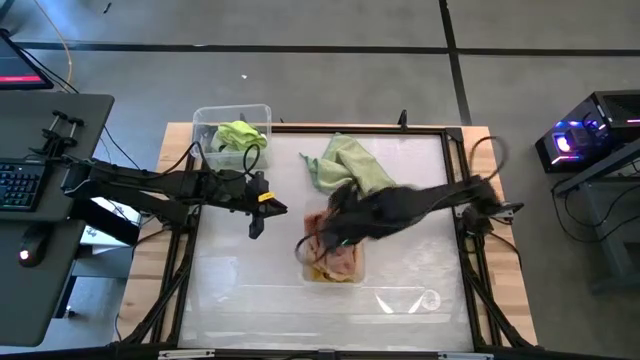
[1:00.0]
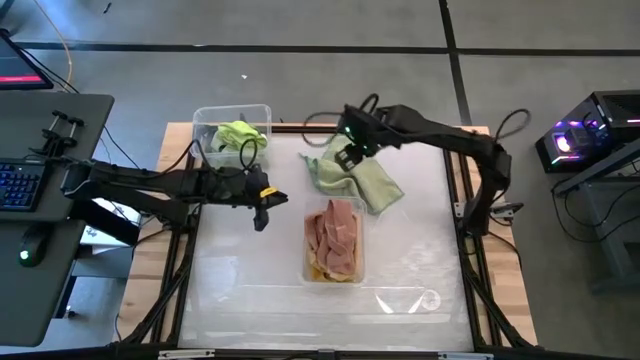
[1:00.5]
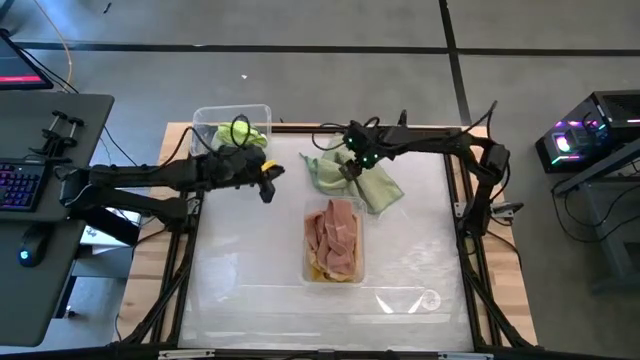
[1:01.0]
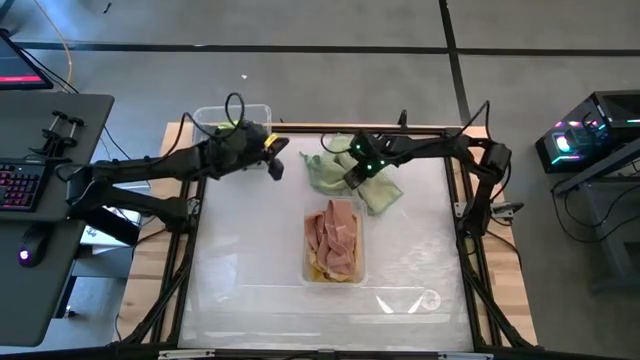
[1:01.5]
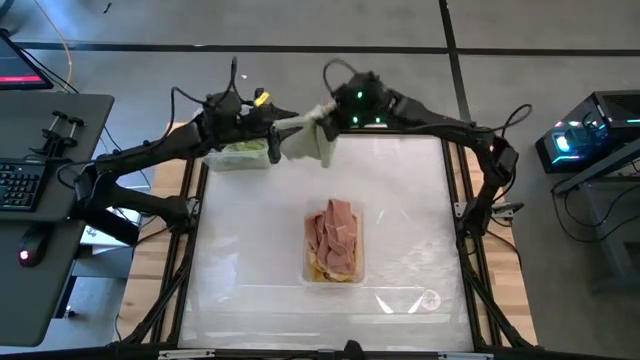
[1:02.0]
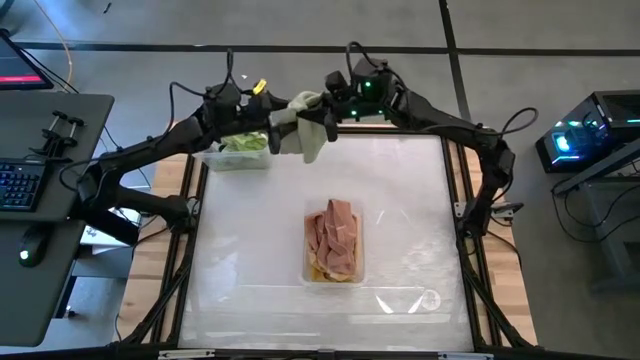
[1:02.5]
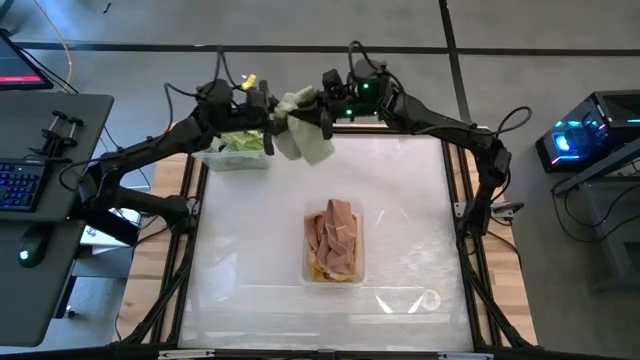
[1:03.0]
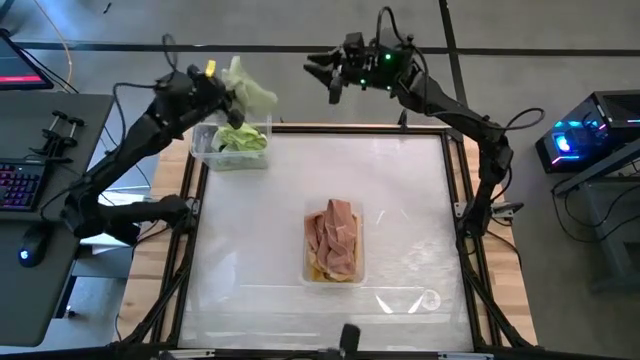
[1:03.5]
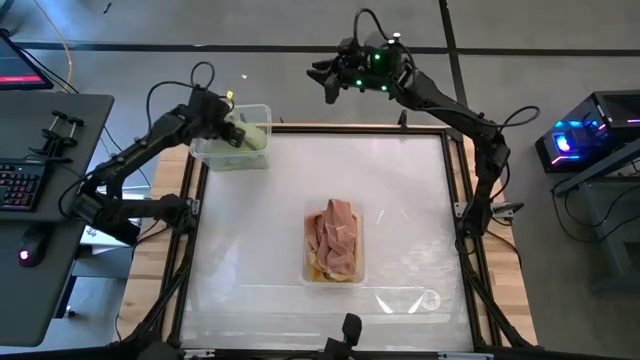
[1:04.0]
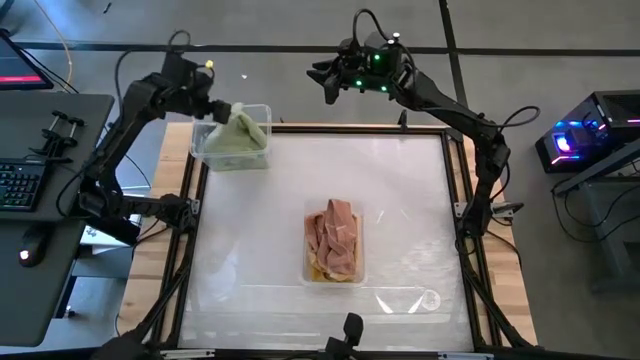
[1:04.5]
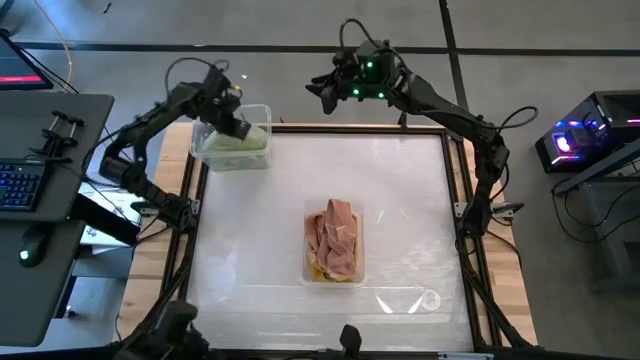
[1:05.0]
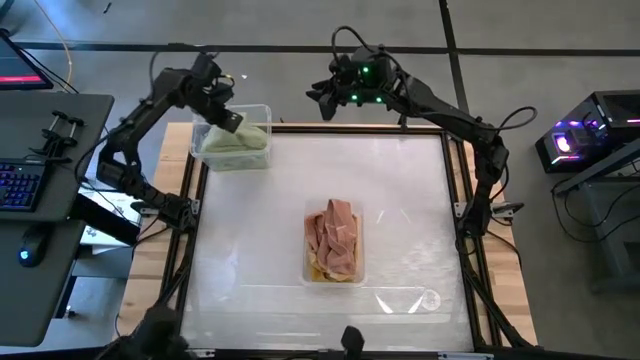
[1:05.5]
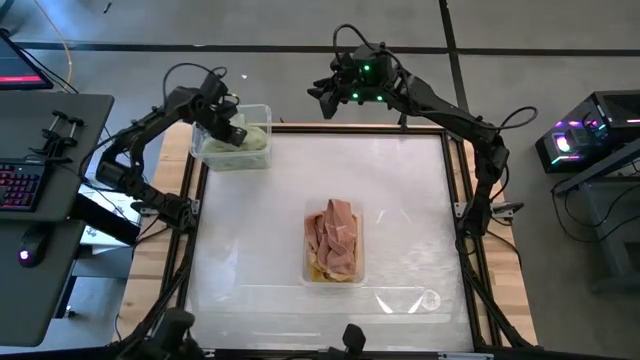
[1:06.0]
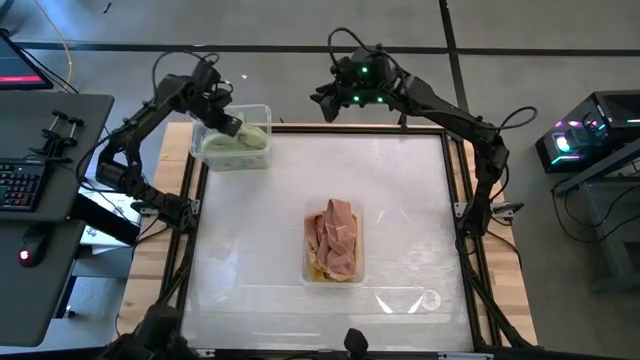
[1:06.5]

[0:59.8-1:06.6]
Task: Sort towels by color in basket
Put the dark green towel into the top transparent bin

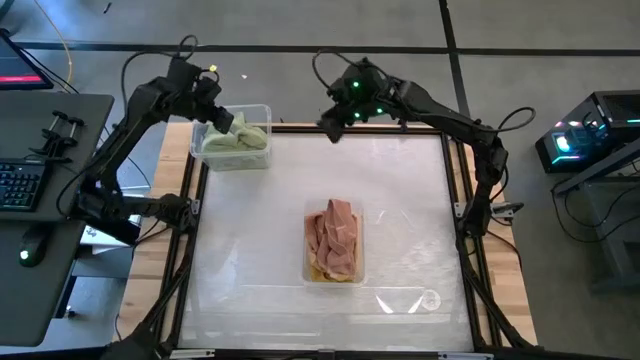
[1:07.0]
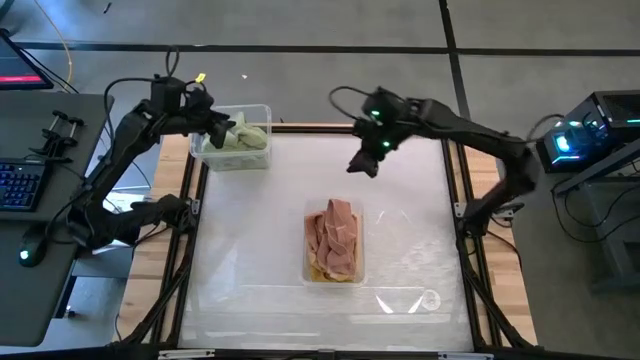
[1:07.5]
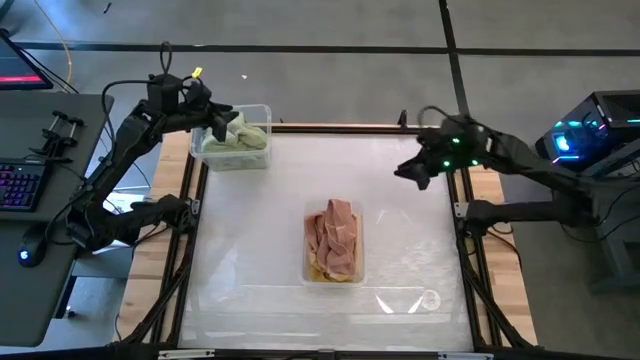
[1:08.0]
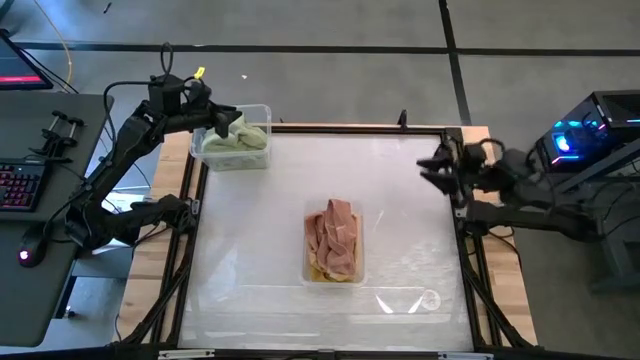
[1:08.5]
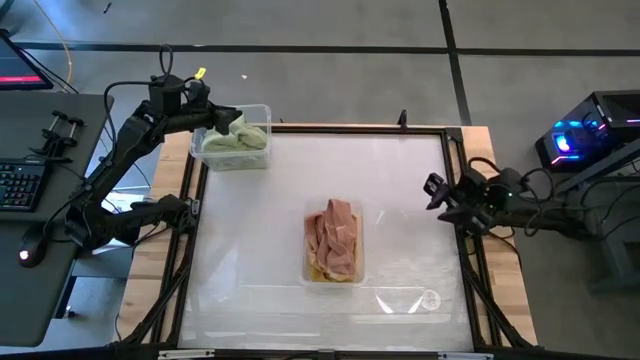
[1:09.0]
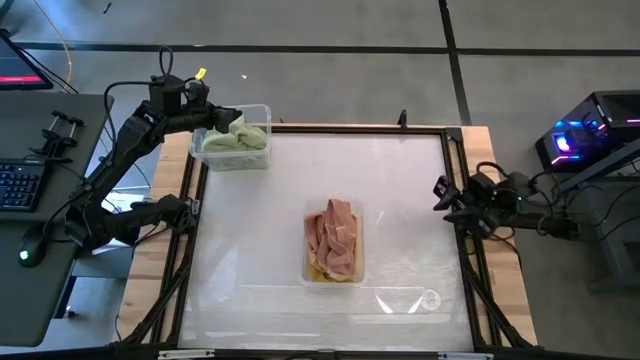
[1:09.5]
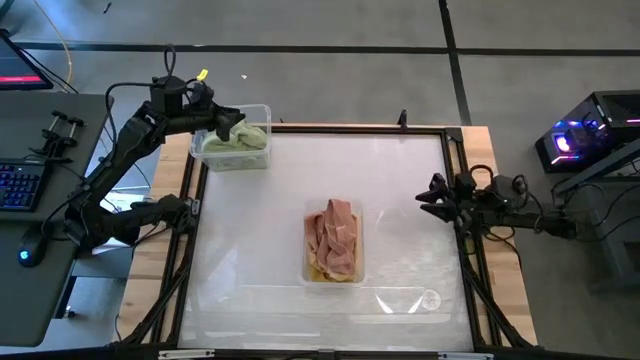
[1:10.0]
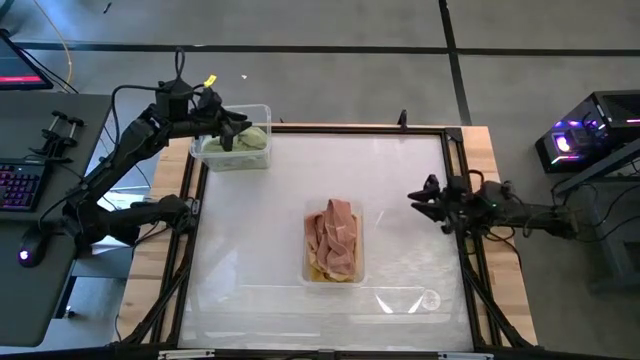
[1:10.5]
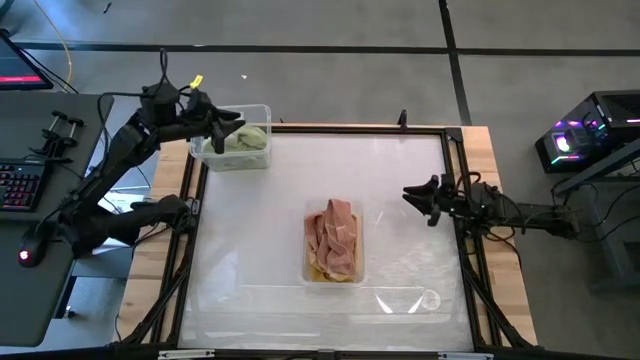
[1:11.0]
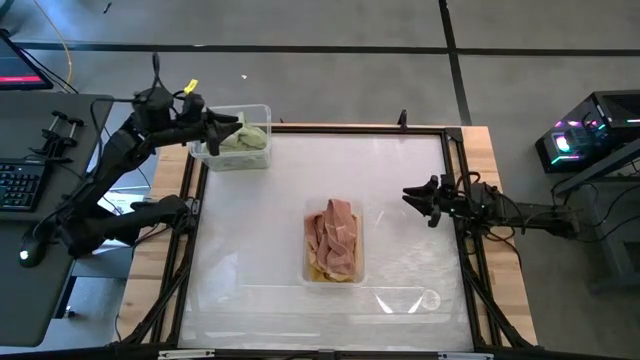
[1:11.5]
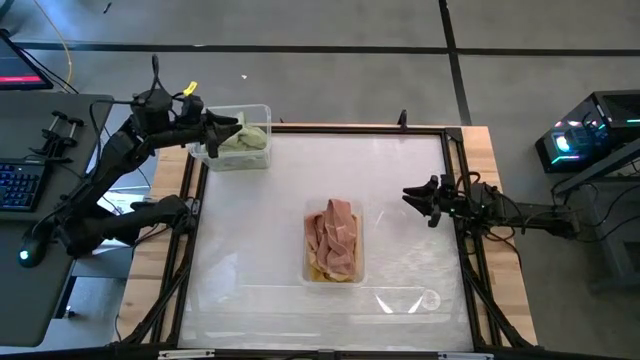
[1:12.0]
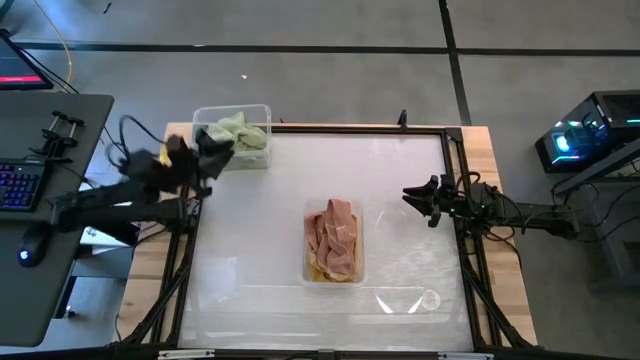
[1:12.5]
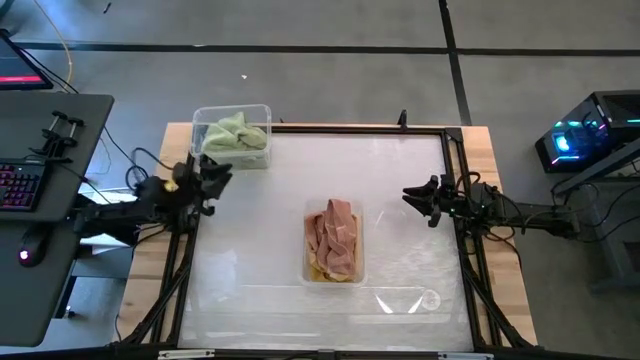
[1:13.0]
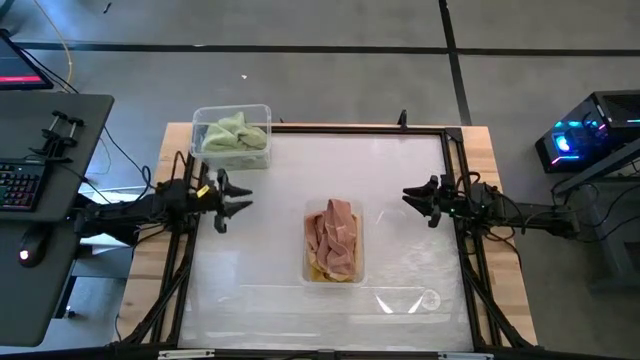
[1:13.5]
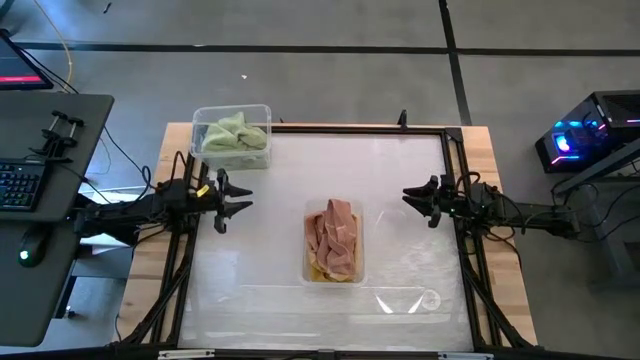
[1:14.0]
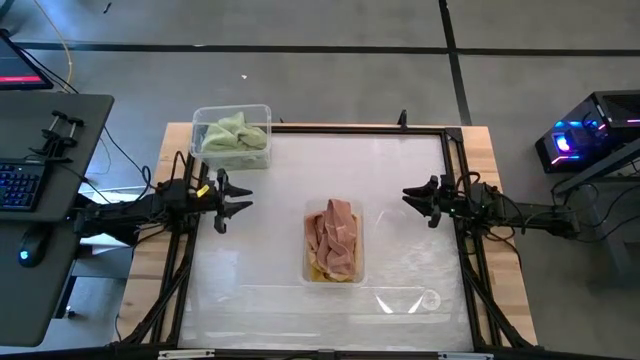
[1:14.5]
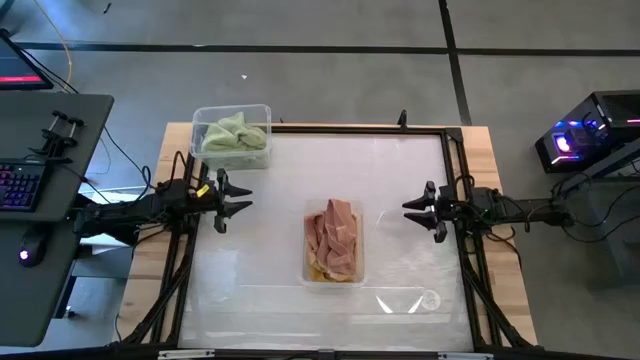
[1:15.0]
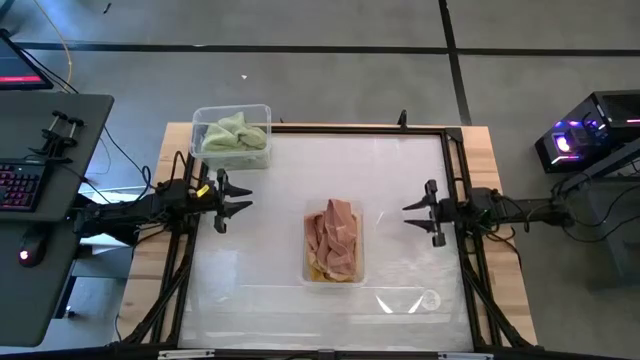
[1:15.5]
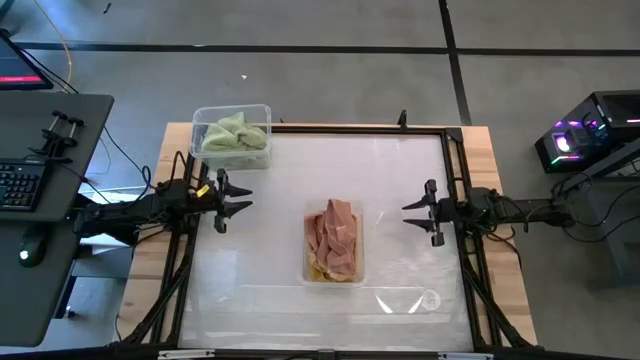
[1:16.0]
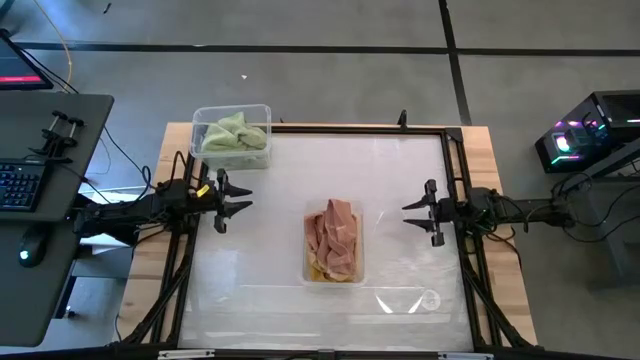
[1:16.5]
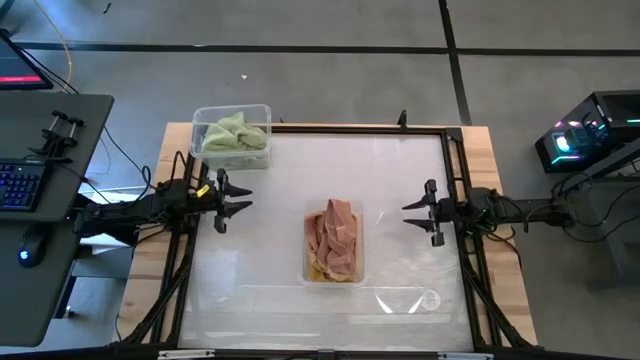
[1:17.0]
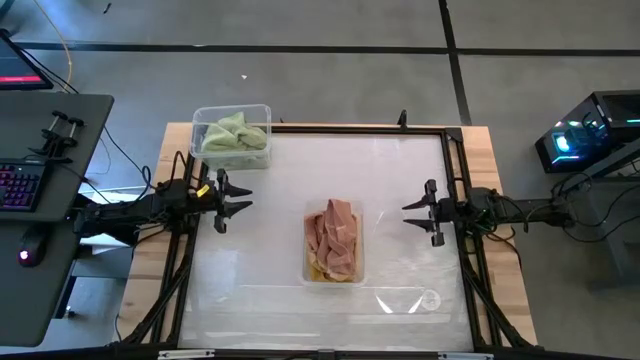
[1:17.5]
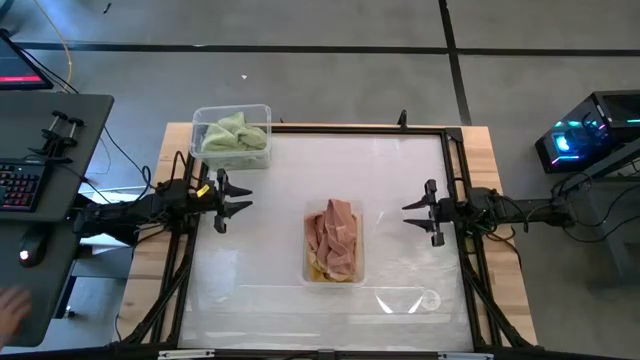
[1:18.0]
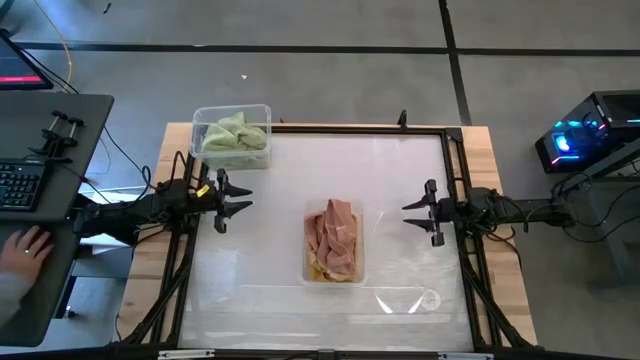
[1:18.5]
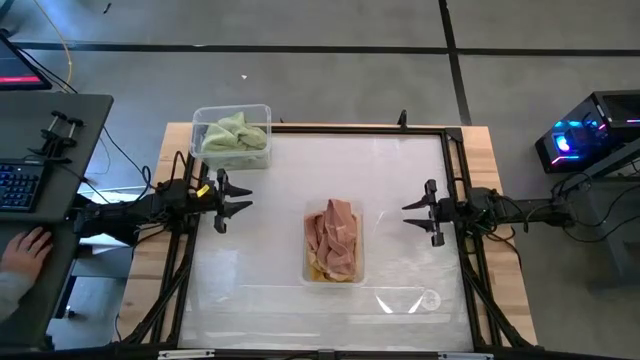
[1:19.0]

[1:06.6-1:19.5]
Return to Home Position

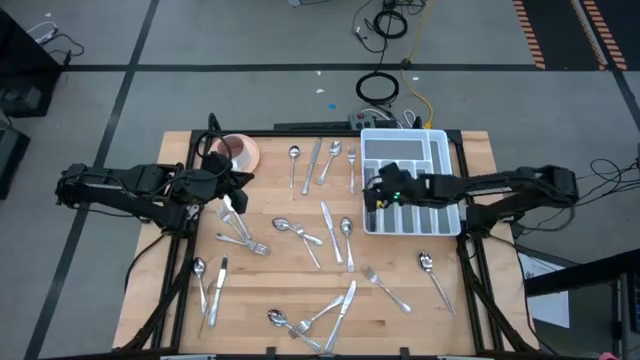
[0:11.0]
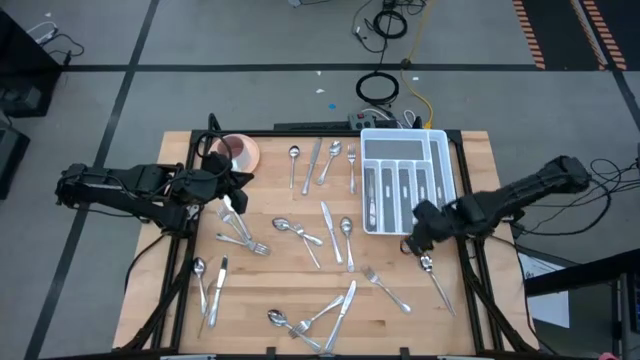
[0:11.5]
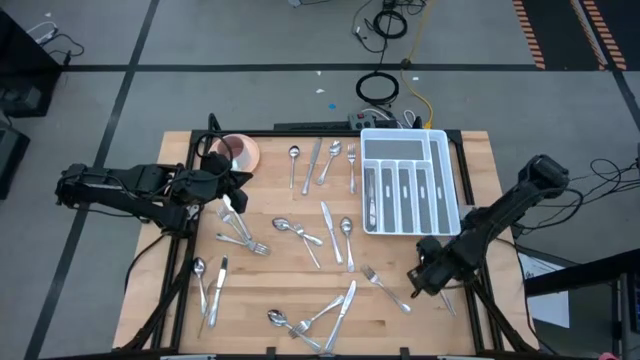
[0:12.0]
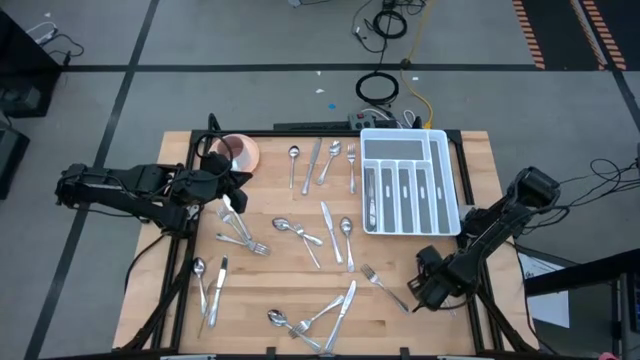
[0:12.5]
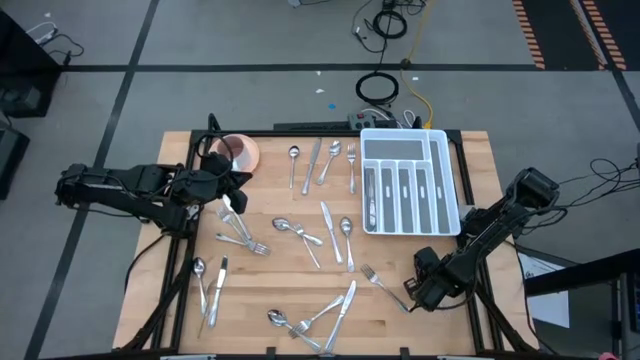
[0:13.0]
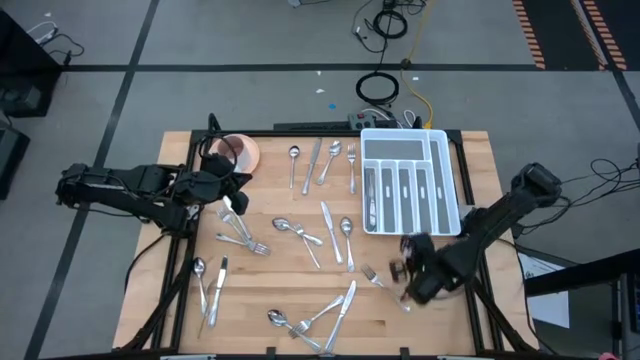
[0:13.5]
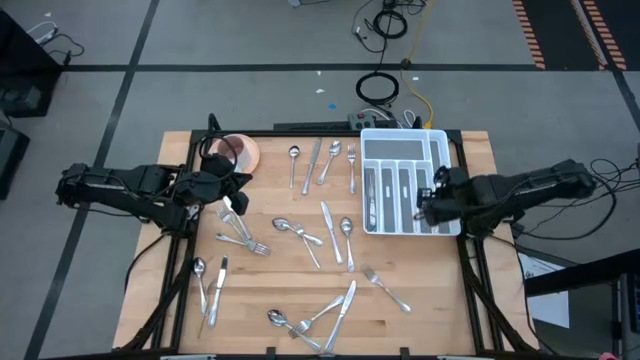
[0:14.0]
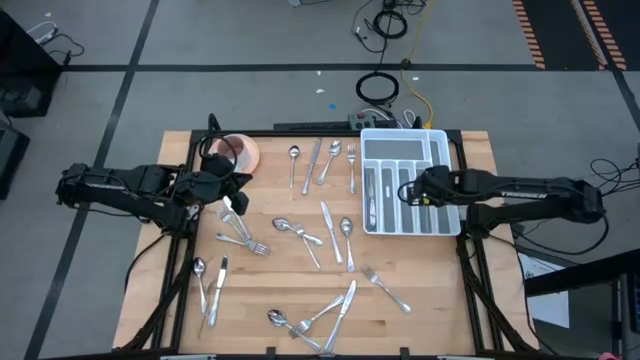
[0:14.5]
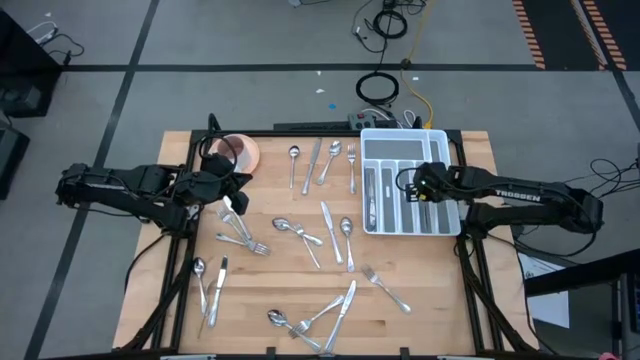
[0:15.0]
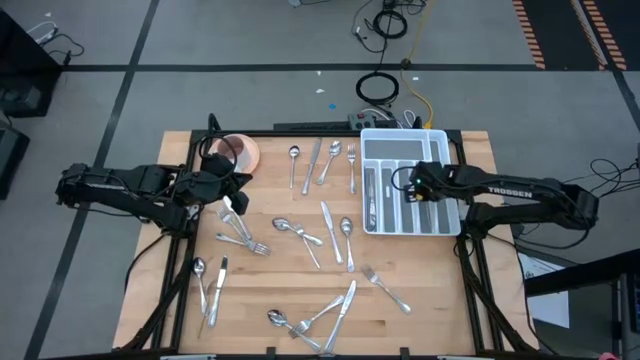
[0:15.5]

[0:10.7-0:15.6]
Task: Sort silverware
Put the silver spoon into the silverware rack
